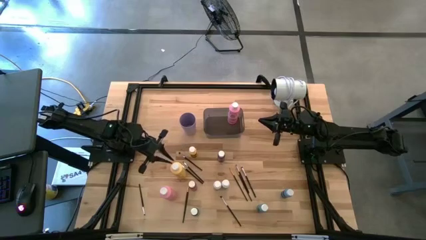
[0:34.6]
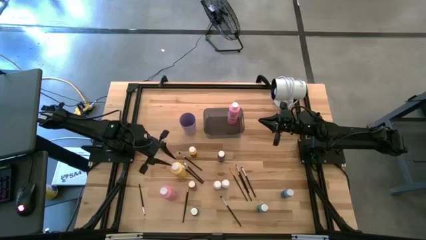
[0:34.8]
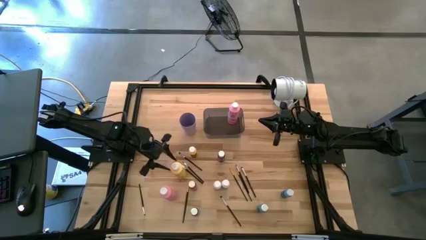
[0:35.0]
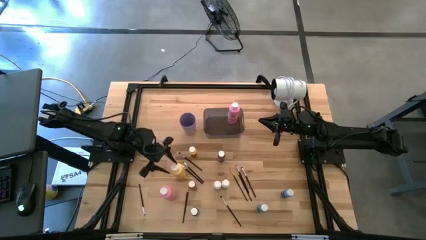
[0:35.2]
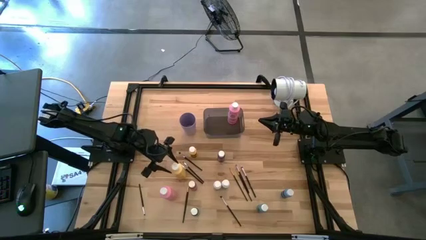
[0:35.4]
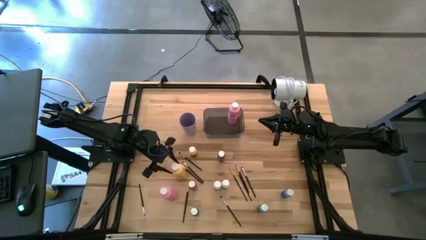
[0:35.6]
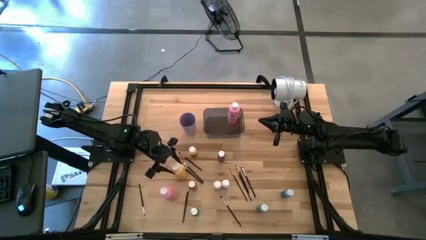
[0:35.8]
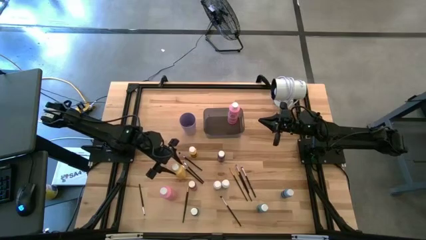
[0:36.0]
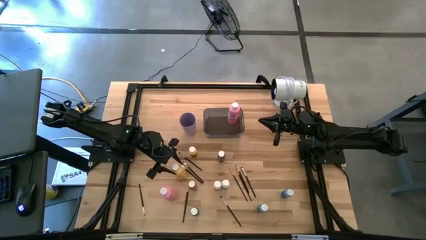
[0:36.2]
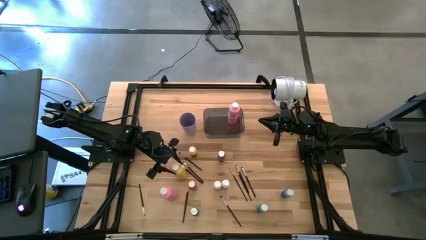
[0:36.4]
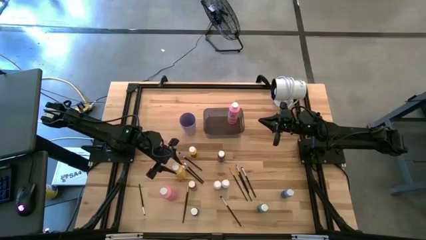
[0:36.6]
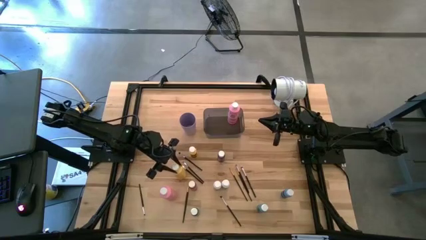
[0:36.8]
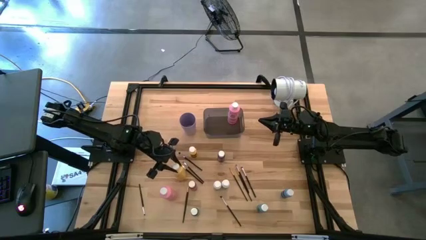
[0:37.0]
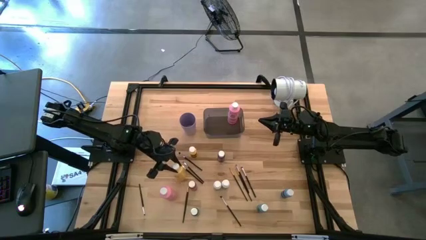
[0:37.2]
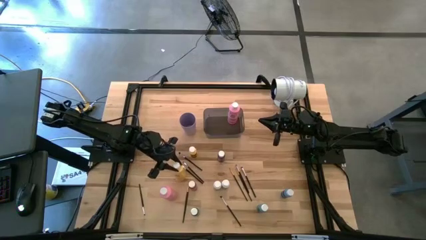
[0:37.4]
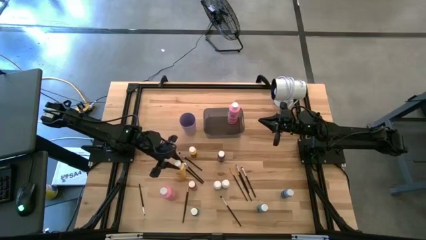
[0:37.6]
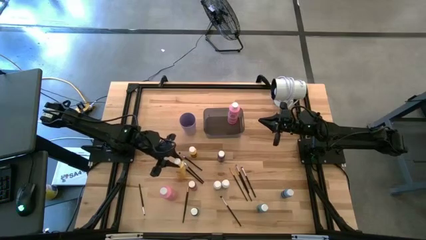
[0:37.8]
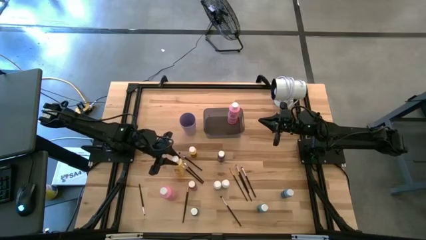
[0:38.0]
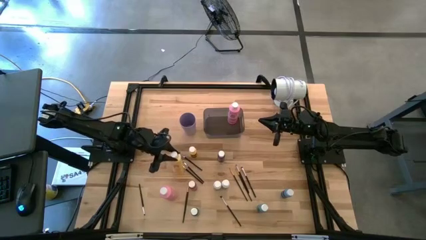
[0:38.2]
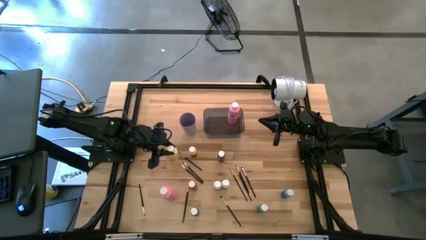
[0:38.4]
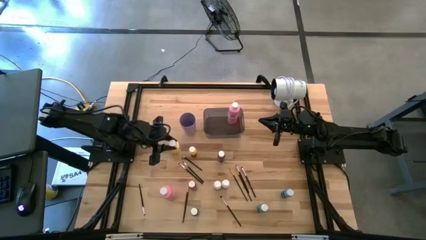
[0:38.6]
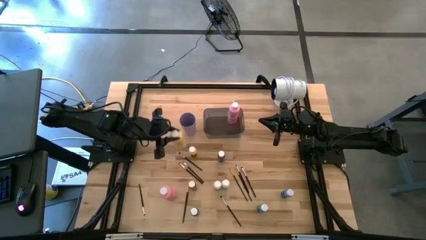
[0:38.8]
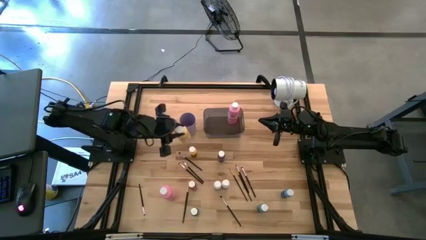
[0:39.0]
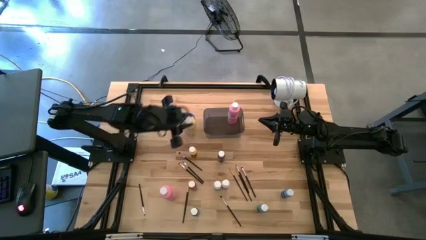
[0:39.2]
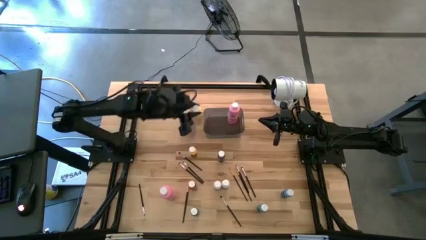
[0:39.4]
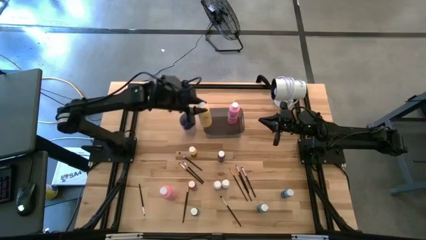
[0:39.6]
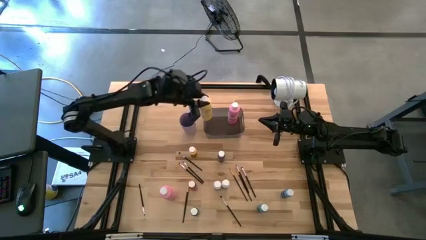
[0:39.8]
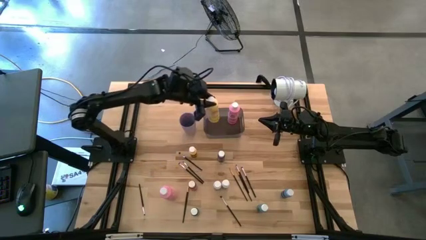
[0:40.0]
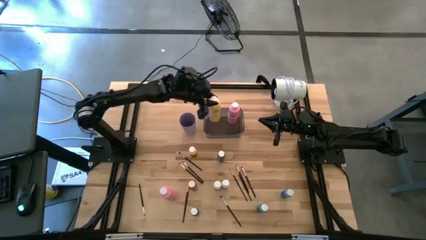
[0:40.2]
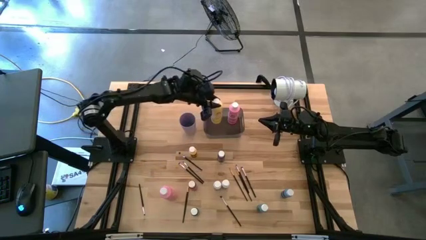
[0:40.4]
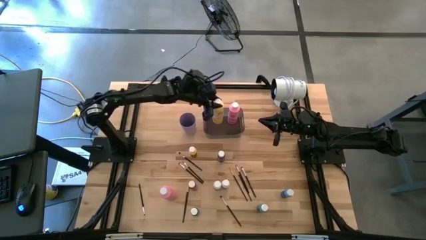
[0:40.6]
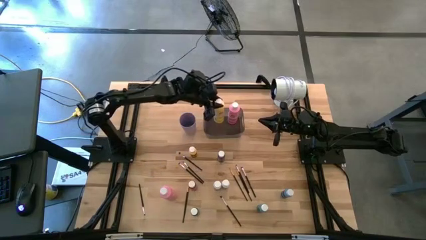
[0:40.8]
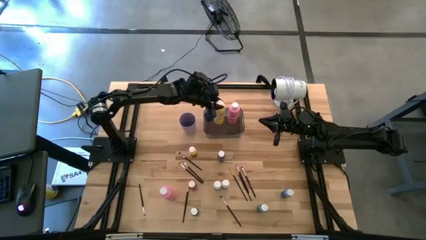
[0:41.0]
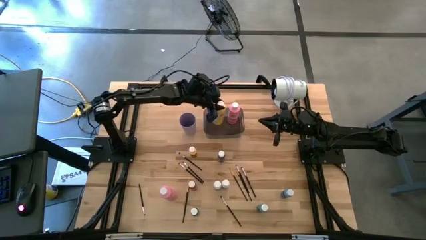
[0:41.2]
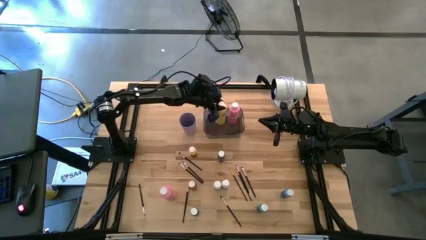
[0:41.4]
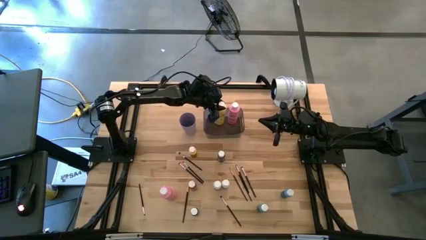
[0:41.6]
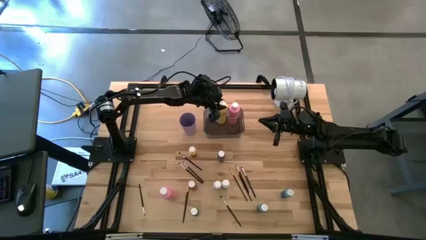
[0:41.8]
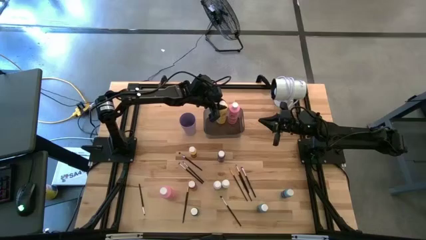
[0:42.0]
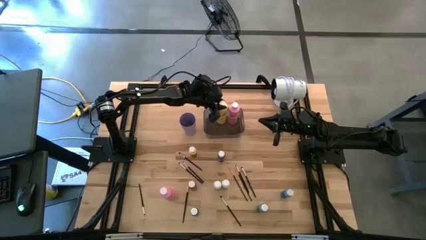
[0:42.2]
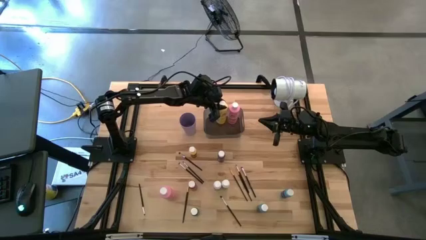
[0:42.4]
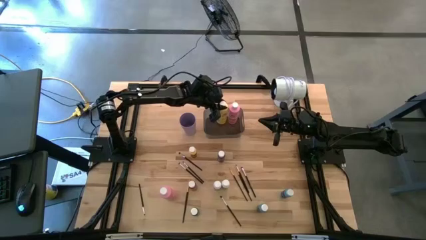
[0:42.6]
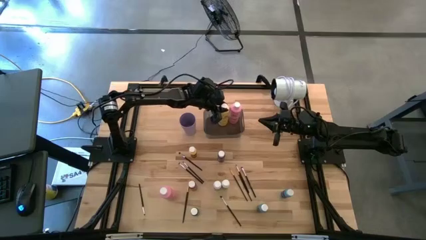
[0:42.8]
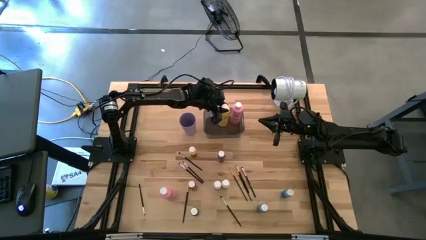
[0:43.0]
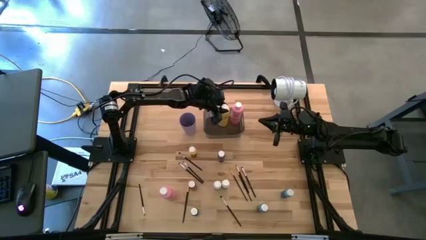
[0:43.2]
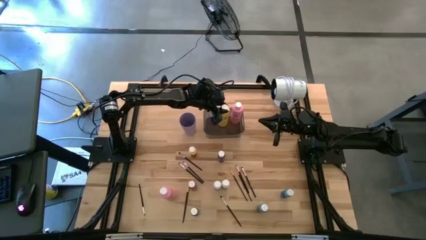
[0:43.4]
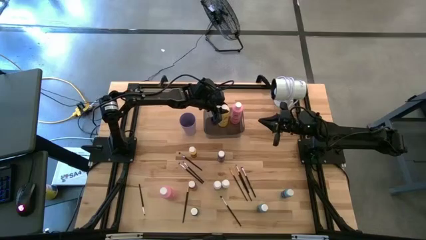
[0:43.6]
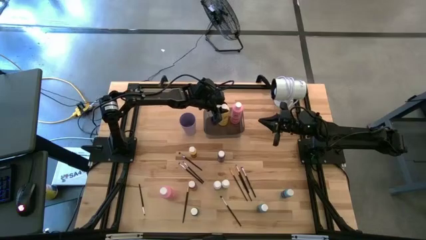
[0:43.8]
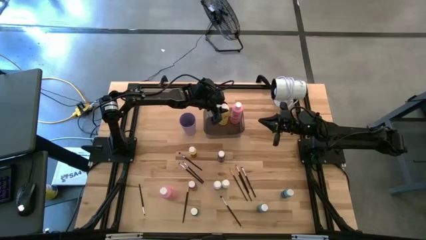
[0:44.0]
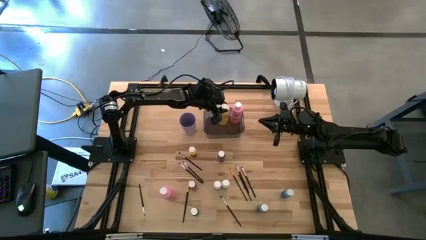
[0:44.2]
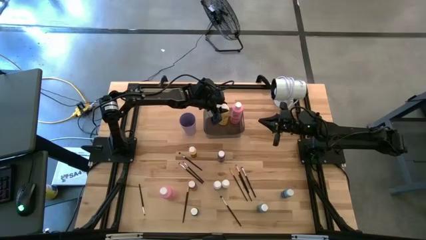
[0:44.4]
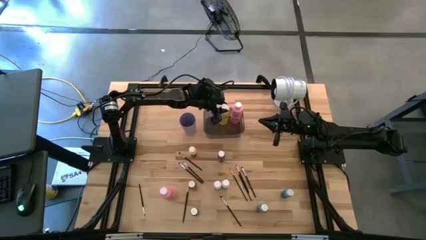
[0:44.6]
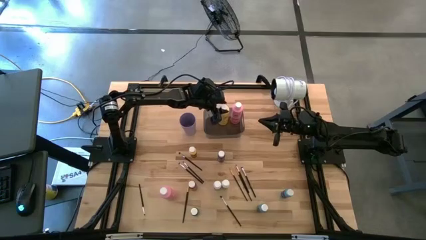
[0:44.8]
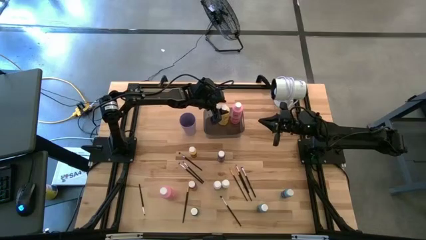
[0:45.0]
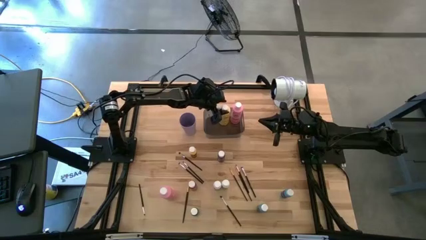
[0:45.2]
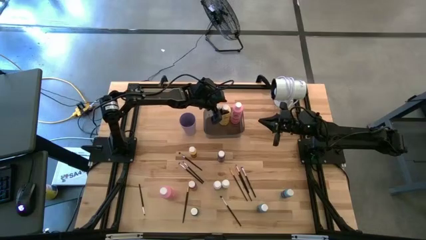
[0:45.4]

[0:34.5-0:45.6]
Task: Pick & Place Paint Supplies
Put the big yellow paint bottle into the gray bin

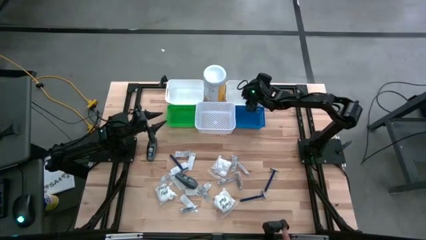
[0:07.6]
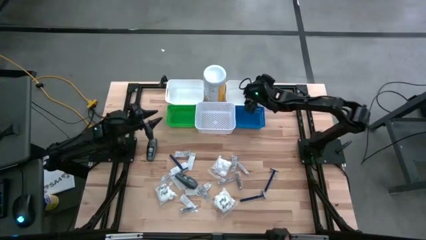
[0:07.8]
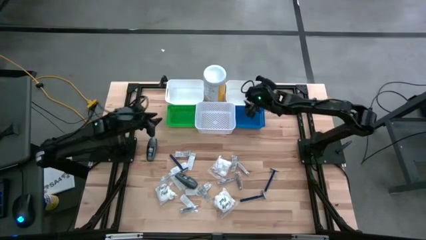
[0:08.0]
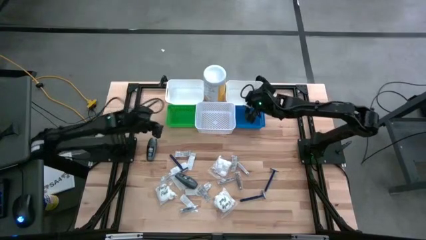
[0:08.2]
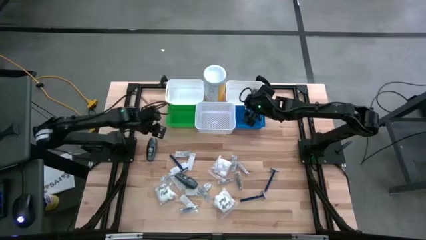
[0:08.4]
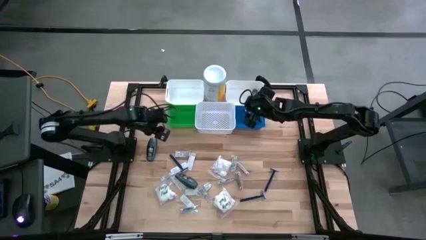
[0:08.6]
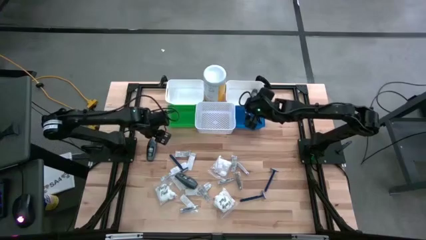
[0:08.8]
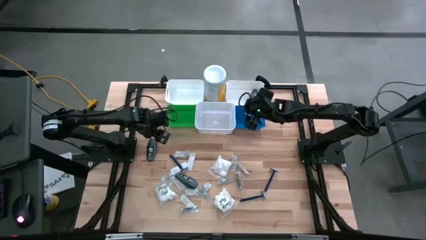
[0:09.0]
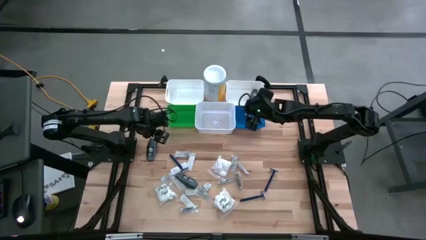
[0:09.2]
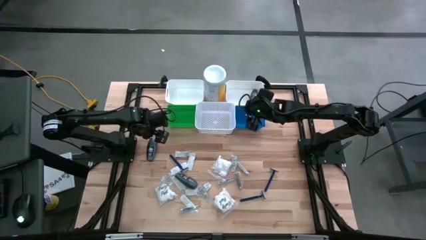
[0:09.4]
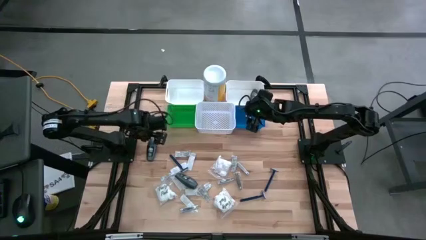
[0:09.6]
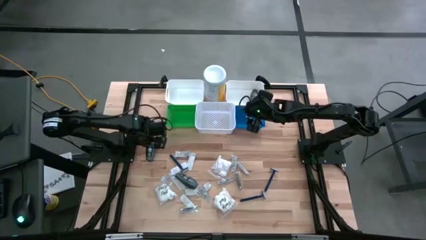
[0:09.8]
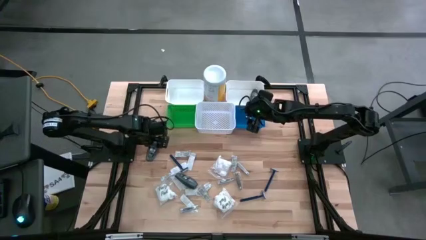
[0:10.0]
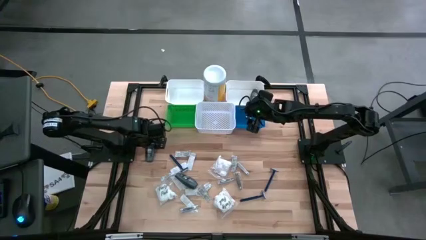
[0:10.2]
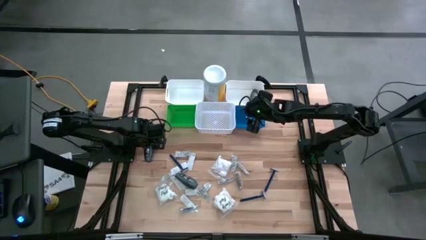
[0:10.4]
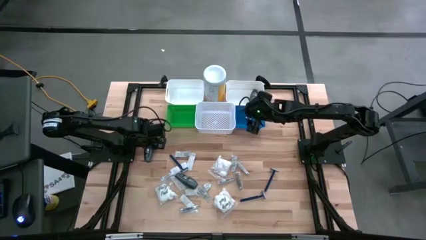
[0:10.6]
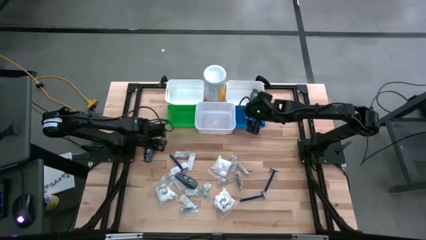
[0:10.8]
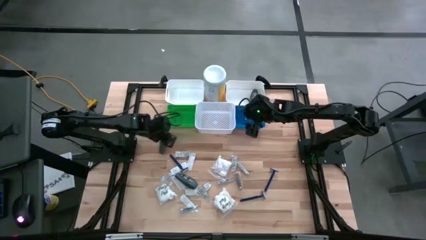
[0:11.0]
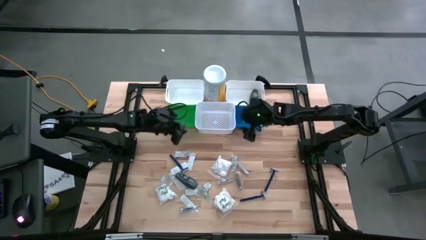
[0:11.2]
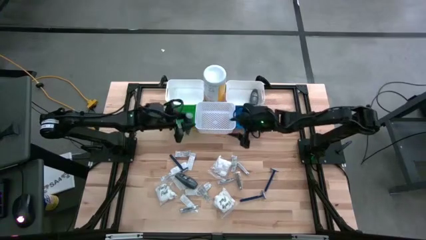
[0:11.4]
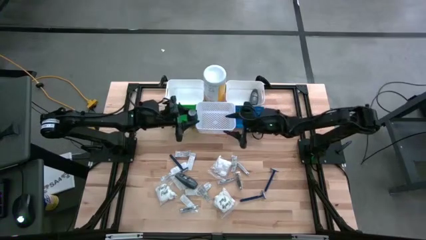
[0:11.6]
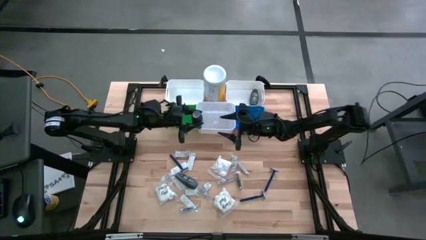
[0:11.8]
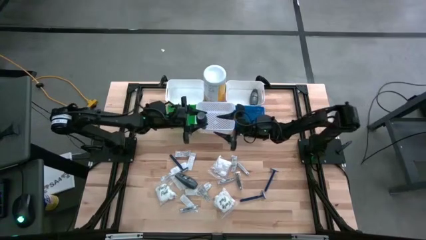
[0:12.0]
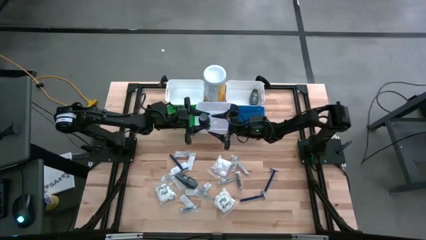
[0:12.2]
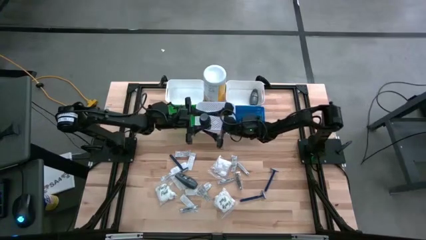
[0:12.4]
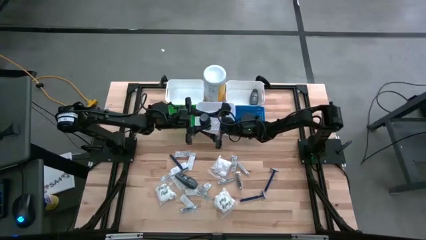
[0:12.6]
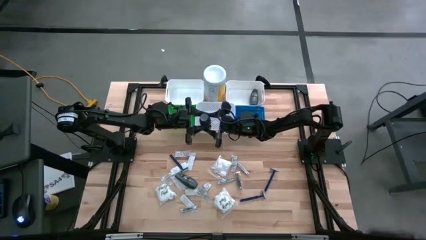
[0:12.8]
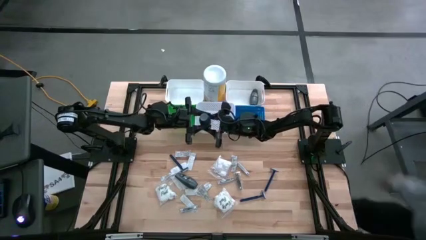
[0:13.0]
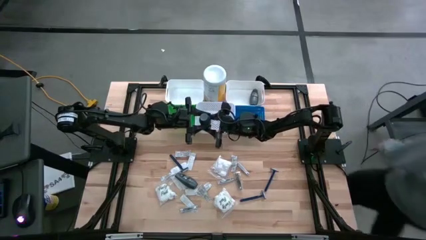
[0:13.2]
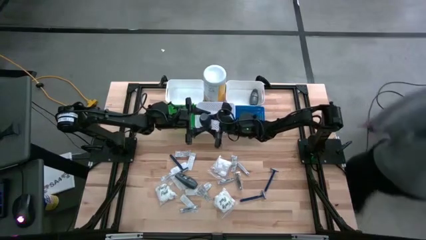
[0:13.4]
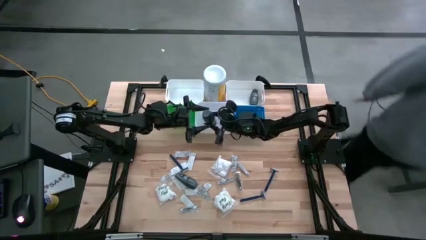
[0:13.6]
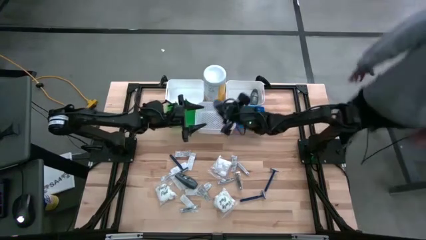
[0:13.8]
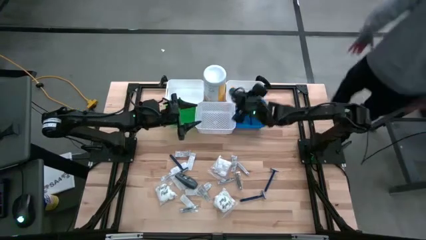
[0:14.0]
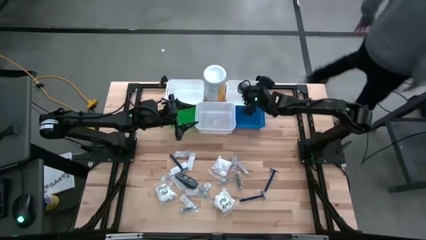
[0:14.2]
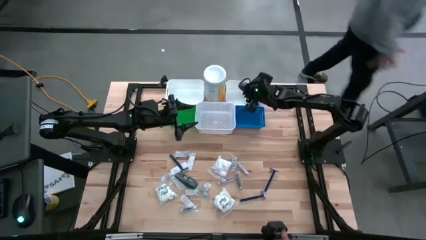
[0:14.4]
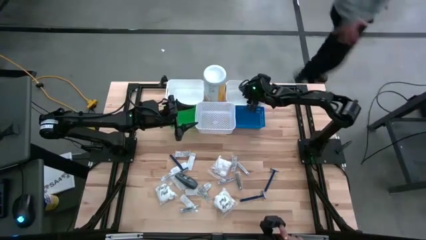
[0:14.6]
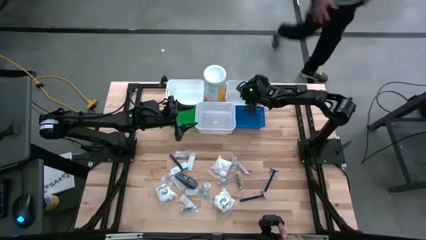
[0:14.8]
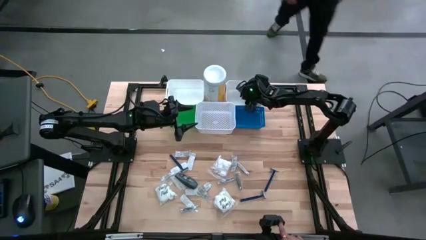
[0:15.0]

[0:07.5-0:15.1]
Task: Pick & Place Travel size toiletries
Put the black deodorant into the top right white bin
